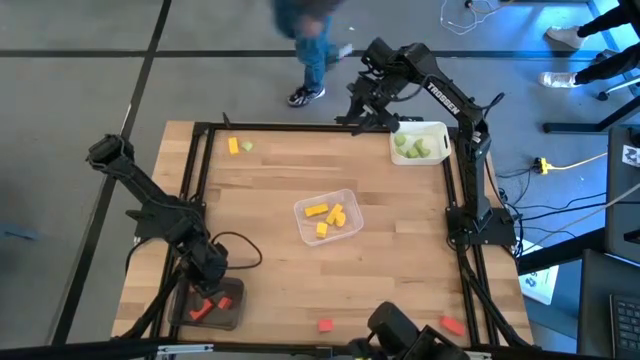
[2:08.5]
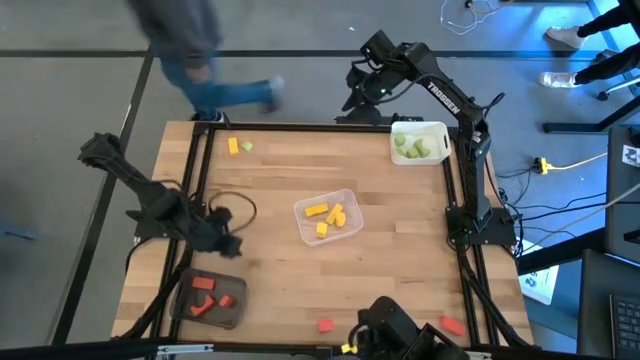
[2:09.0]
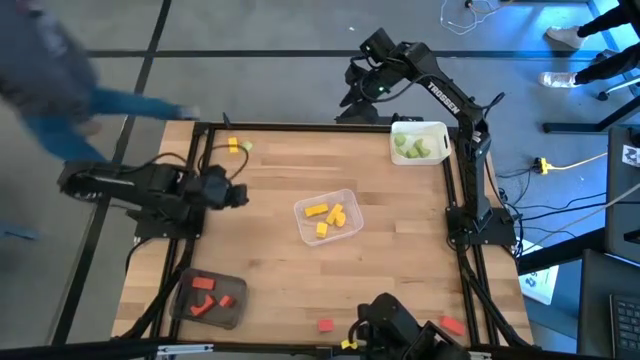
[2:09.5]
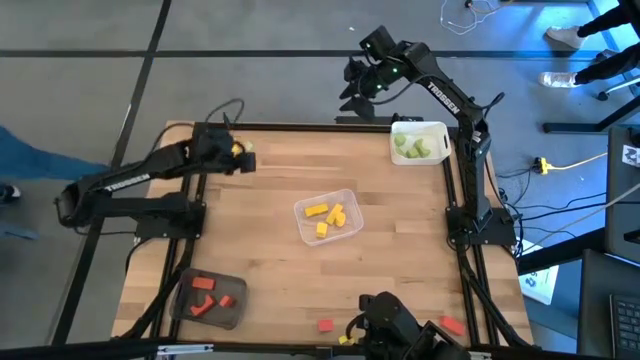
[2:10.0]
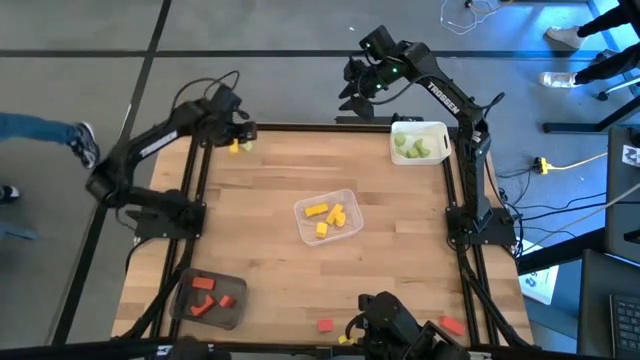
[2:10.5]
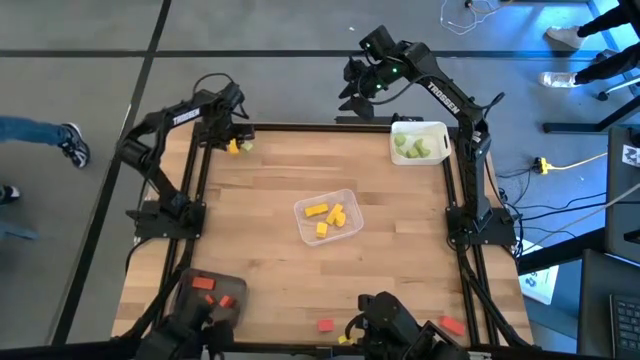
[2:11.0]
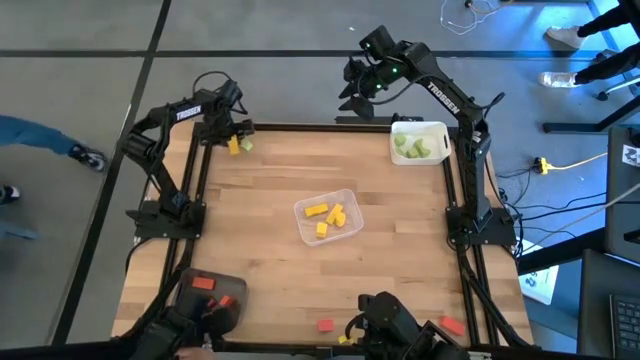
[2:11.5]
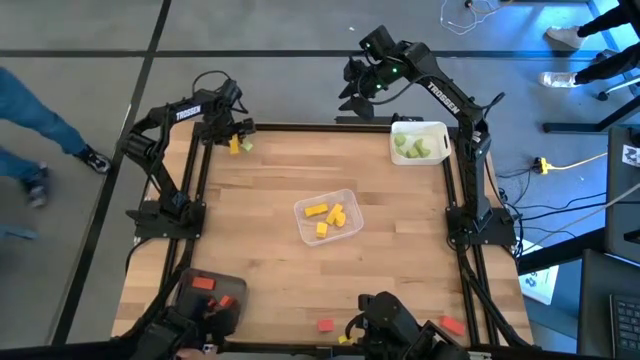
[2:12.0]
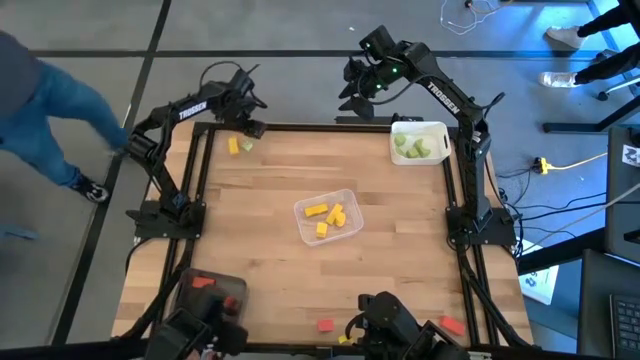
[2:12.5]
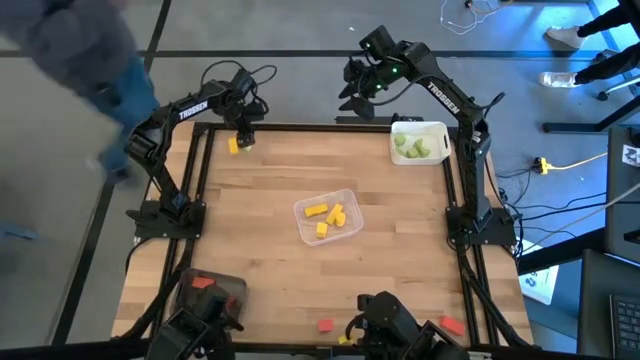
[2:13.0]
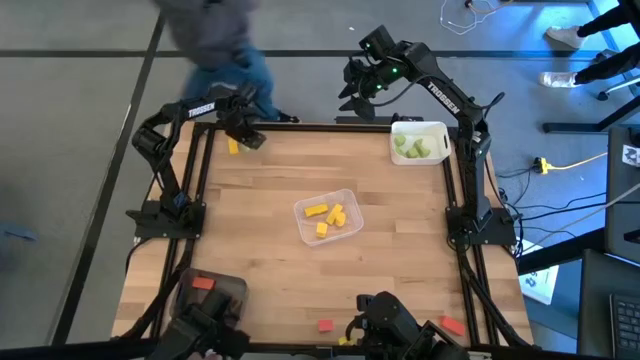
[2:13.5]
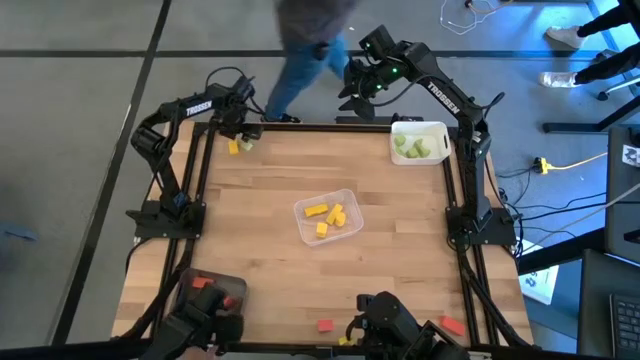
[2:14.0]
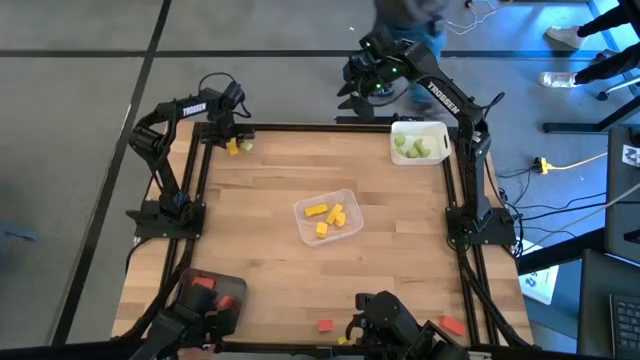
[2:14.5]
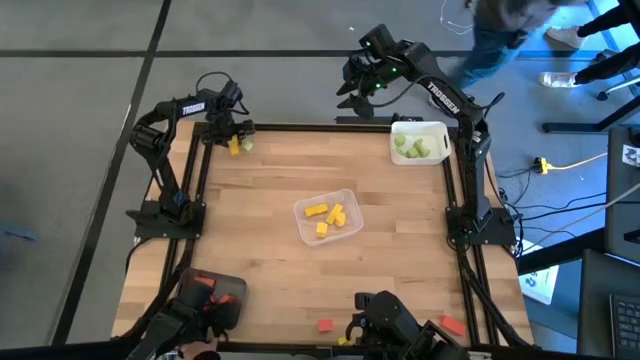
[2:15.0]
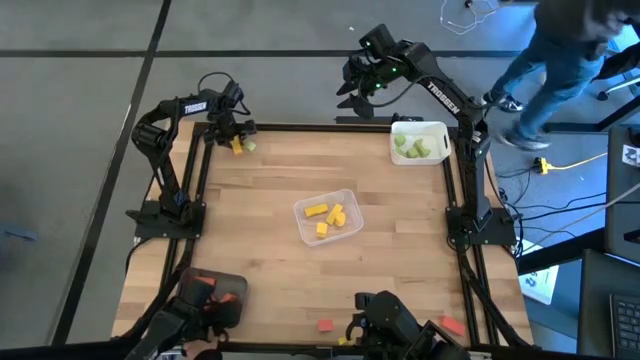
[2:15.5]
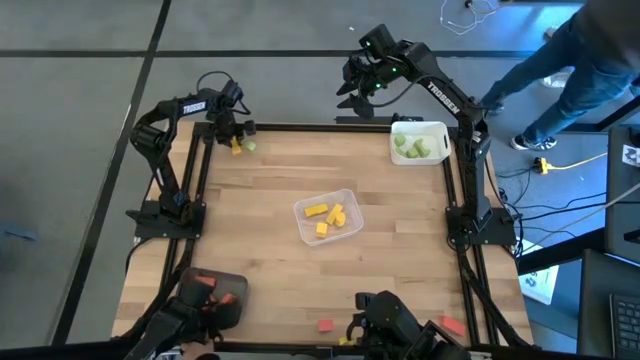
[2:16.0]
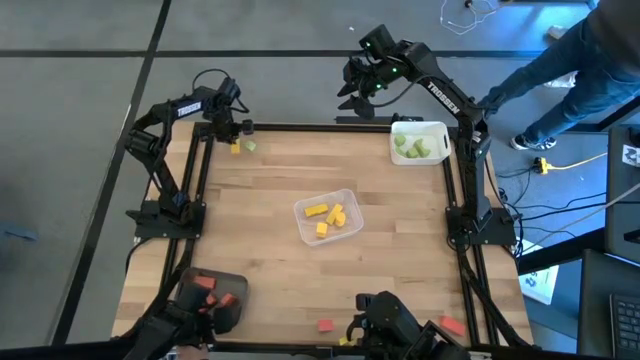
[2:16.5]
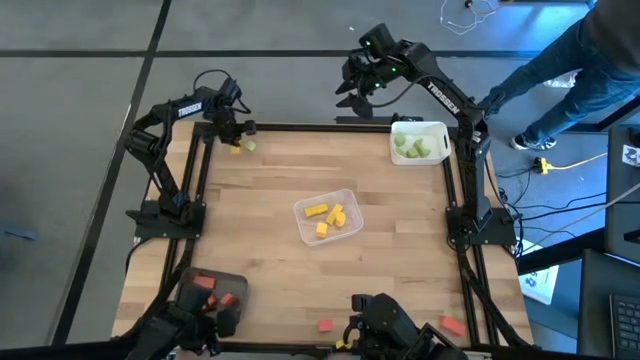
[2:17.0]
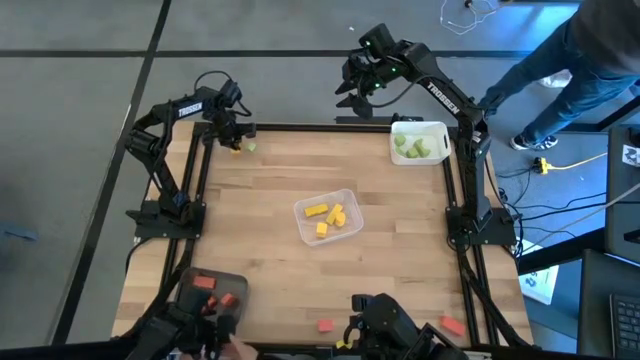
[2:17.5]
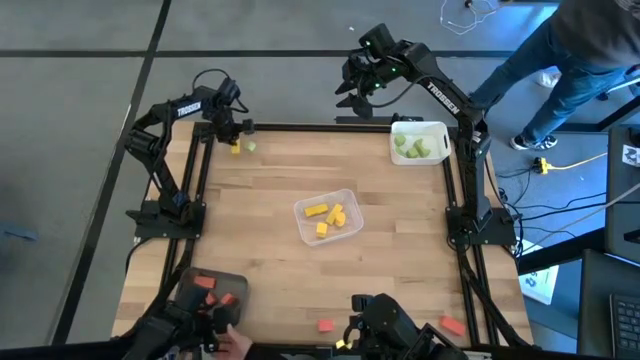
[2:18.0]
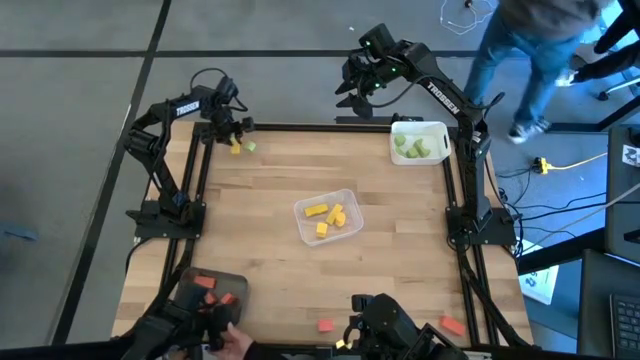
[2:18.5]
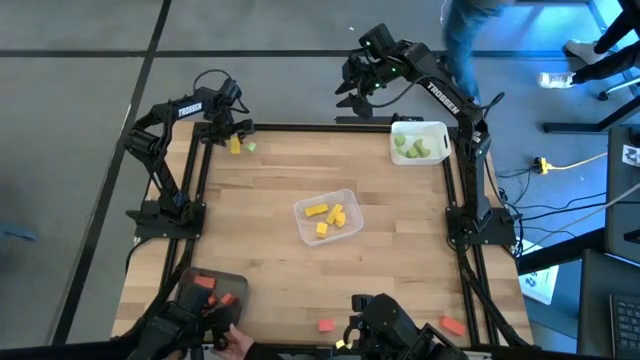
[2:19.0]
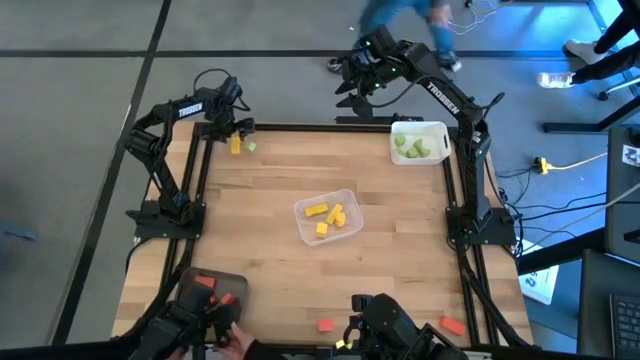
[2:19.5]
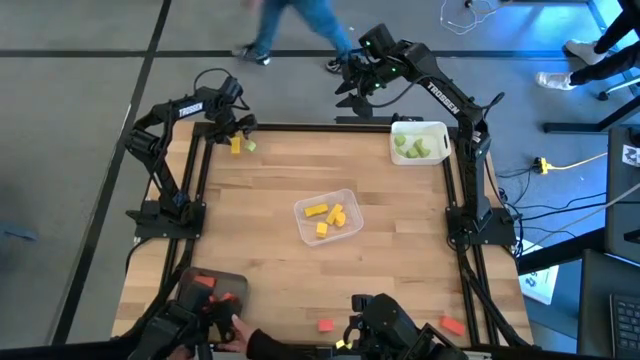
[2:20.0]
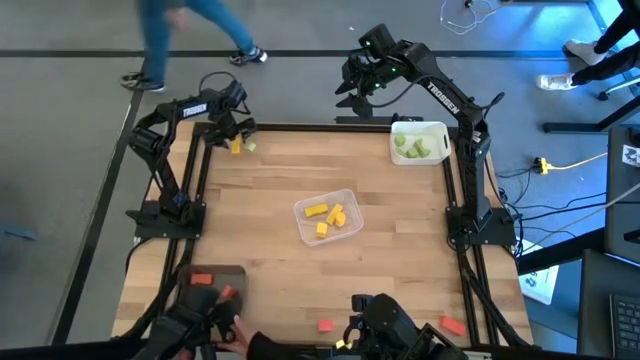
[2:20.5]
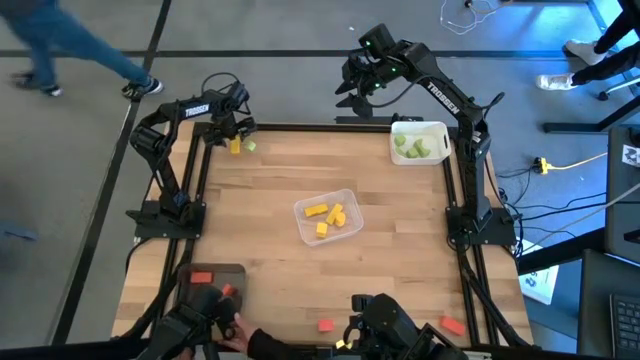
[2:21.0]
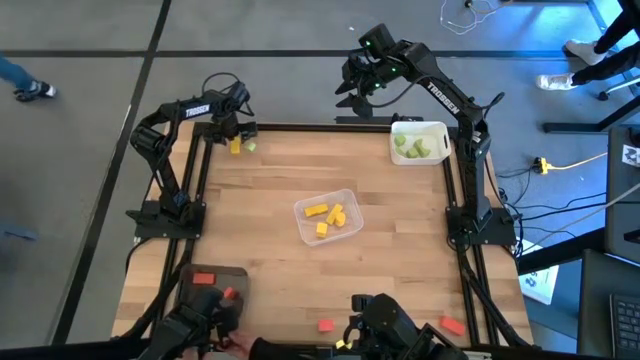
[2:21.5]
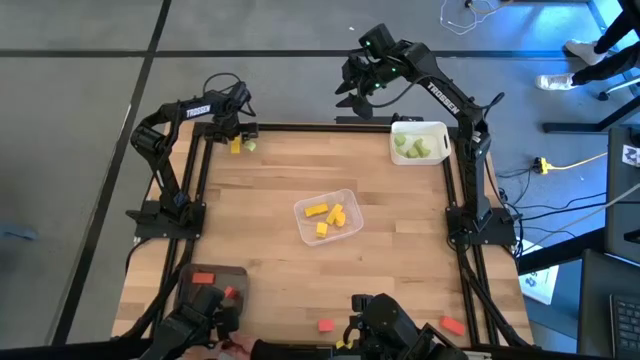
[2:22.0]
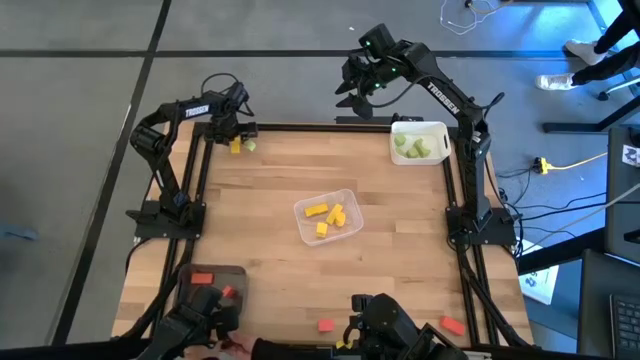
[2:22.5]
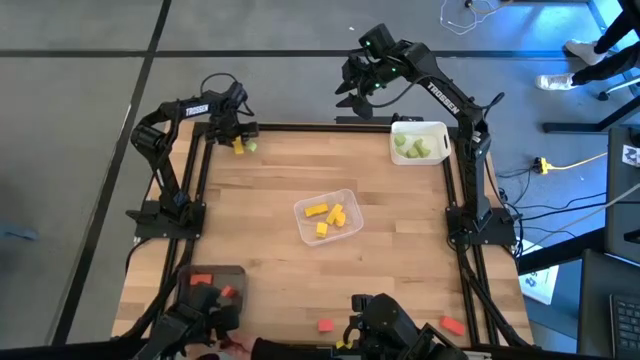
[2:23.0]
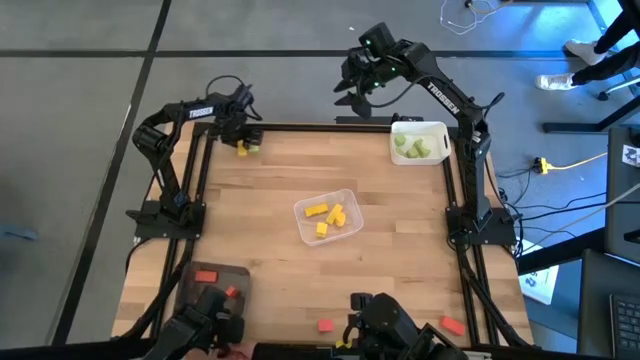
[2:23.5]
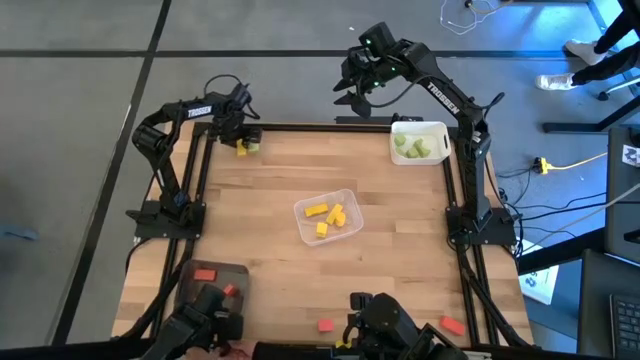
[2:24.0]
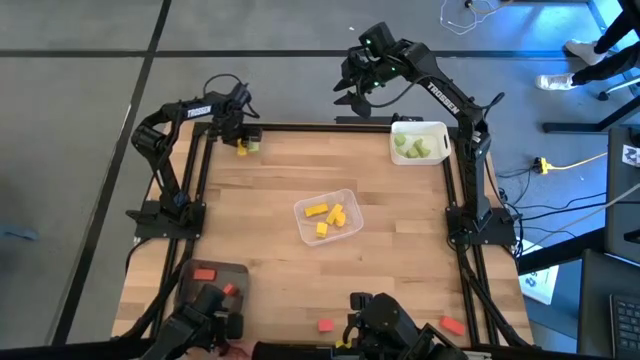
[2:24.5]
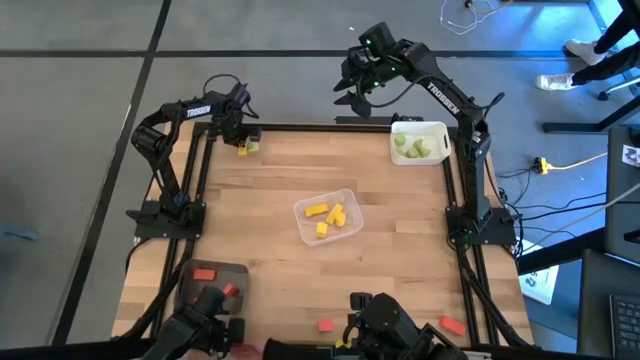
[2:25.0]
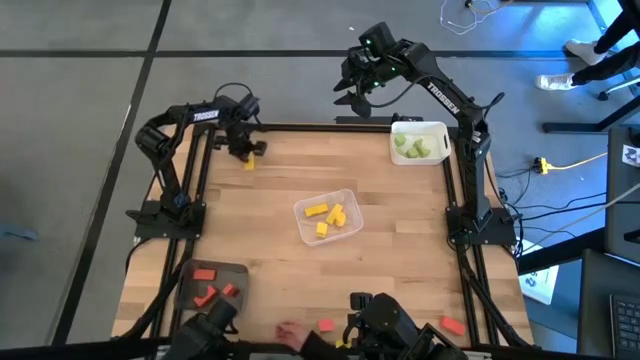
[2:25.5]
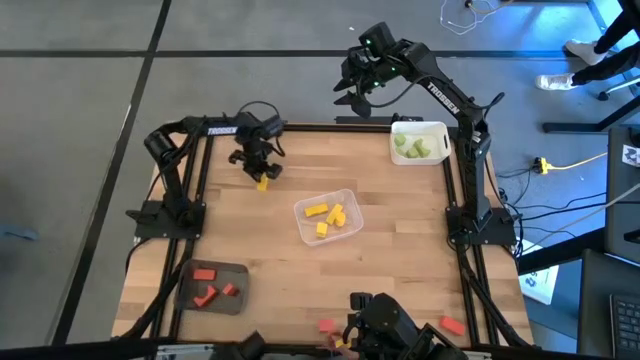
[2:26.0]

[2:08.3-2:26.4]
Task: Sort & place blocks by color
Put the yellow block into the transparent bin
